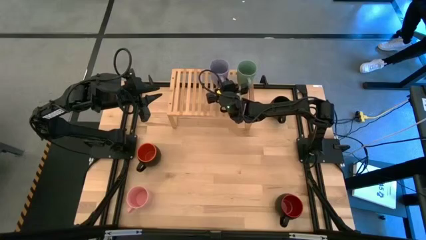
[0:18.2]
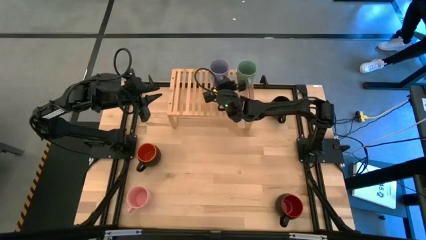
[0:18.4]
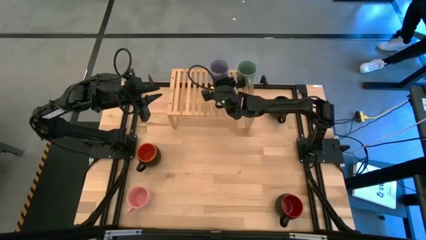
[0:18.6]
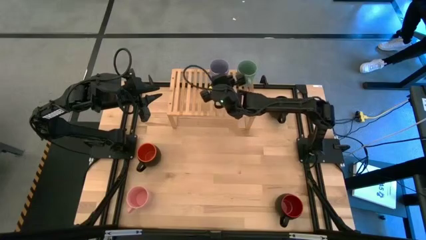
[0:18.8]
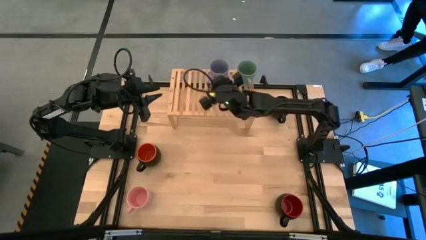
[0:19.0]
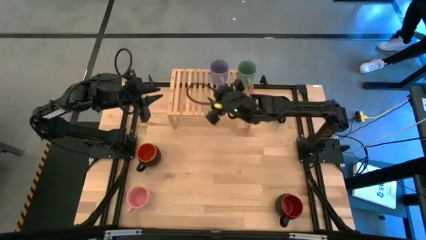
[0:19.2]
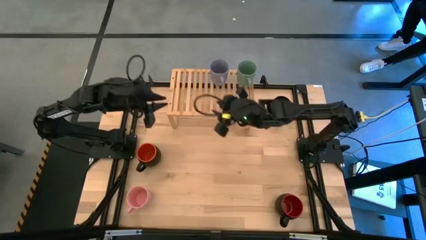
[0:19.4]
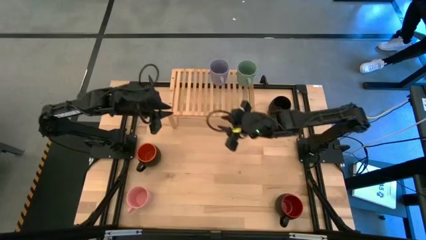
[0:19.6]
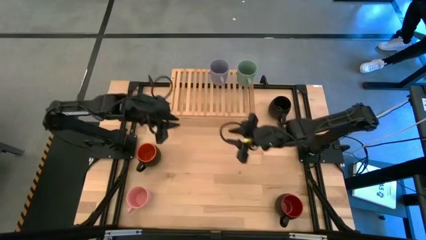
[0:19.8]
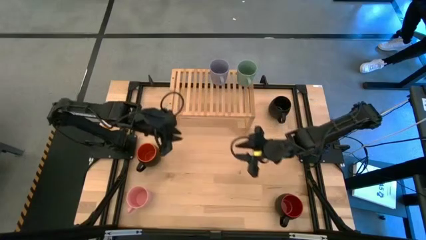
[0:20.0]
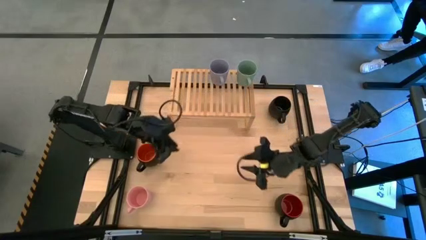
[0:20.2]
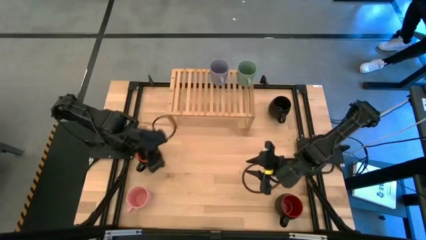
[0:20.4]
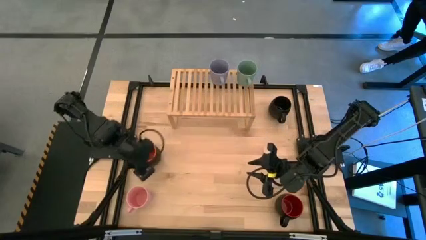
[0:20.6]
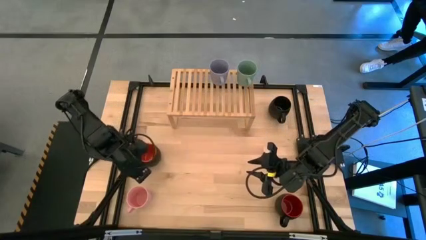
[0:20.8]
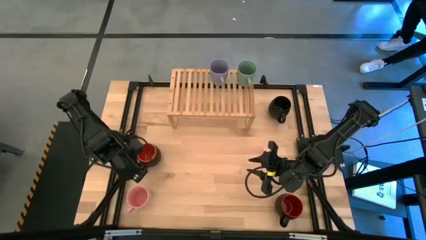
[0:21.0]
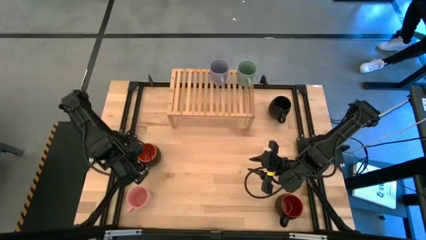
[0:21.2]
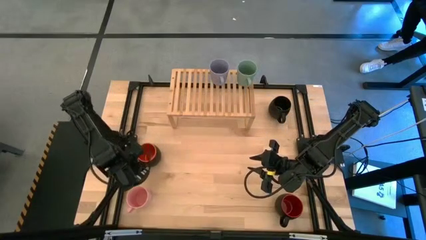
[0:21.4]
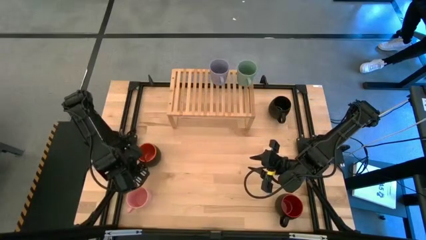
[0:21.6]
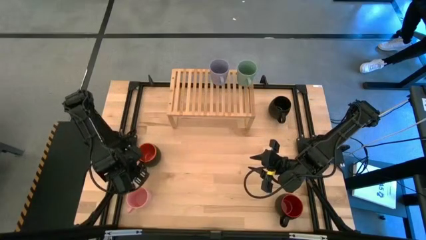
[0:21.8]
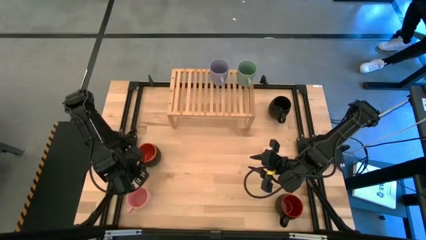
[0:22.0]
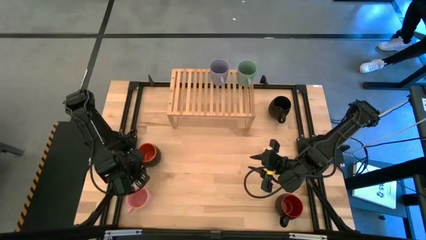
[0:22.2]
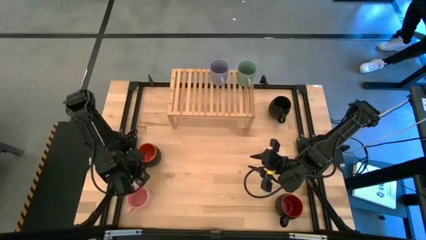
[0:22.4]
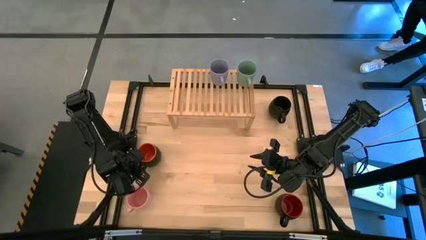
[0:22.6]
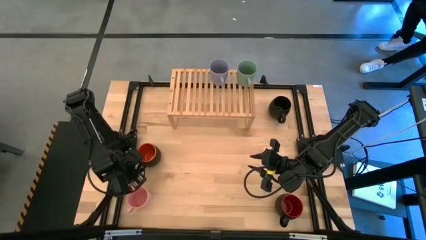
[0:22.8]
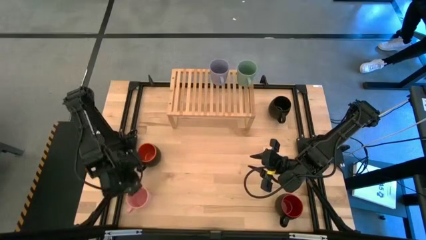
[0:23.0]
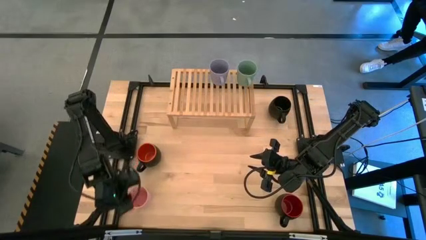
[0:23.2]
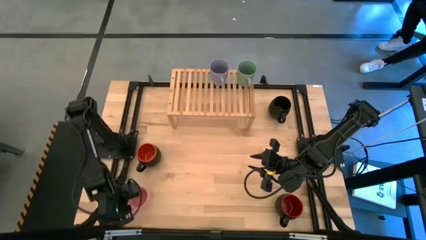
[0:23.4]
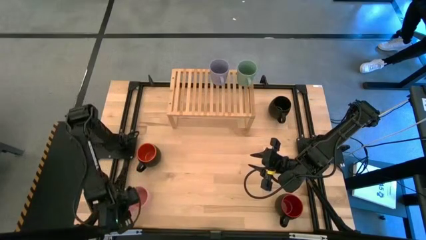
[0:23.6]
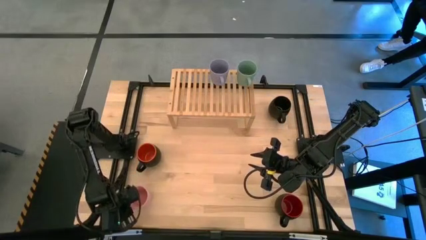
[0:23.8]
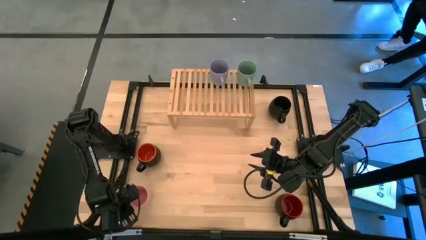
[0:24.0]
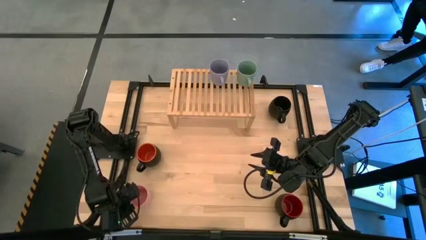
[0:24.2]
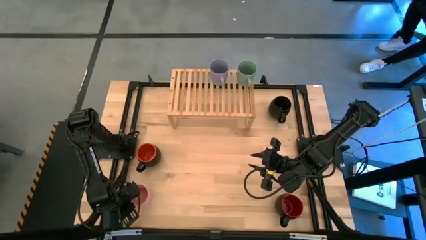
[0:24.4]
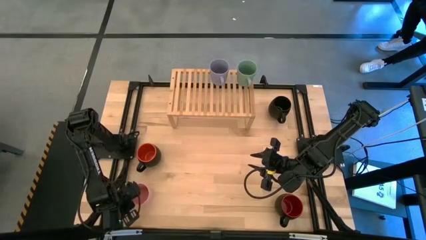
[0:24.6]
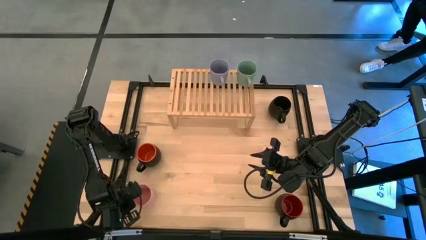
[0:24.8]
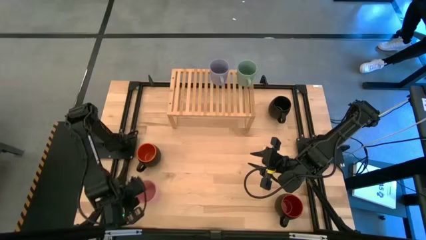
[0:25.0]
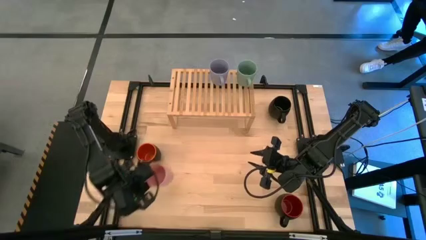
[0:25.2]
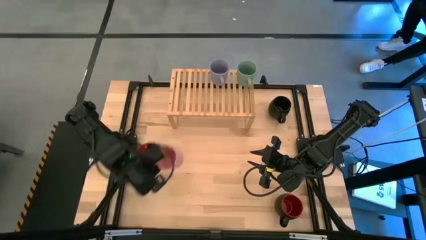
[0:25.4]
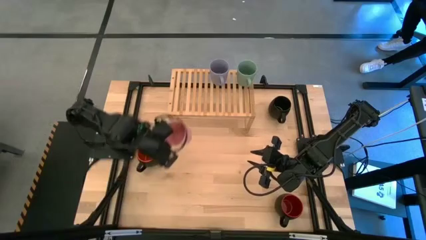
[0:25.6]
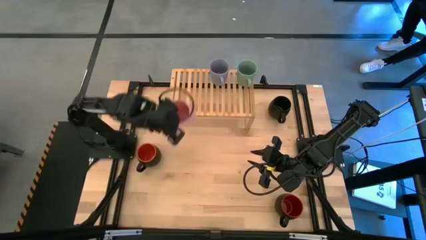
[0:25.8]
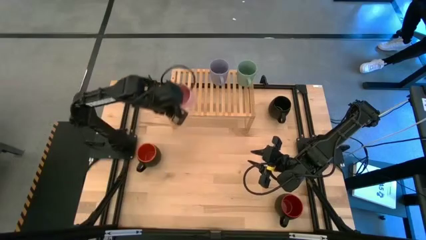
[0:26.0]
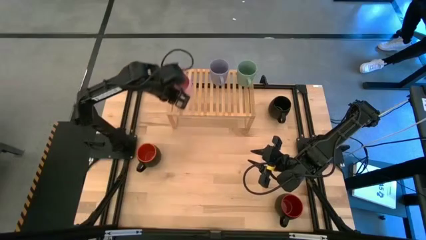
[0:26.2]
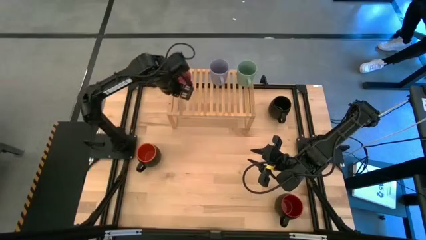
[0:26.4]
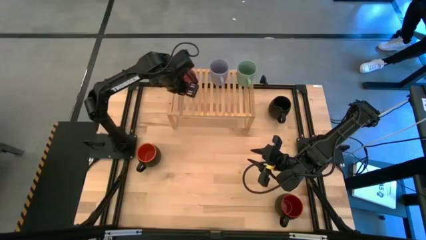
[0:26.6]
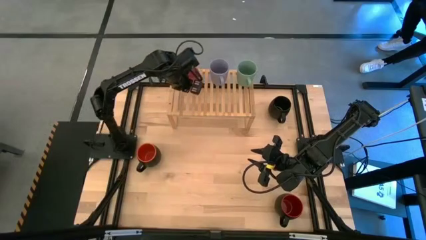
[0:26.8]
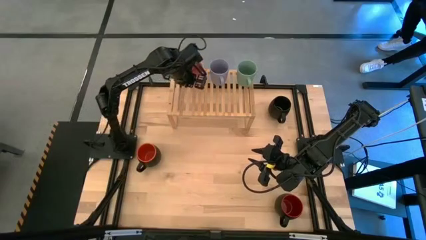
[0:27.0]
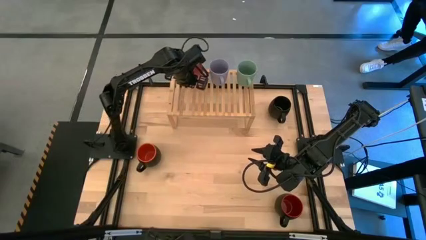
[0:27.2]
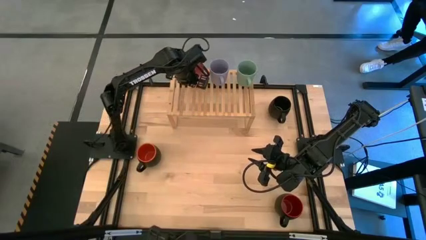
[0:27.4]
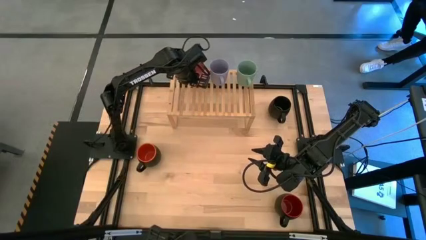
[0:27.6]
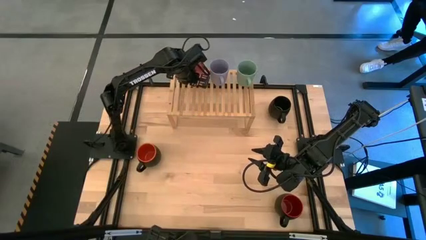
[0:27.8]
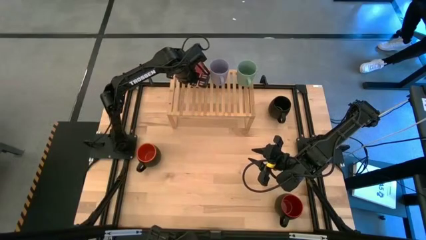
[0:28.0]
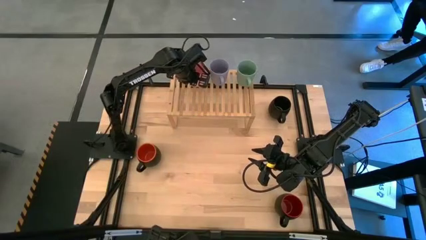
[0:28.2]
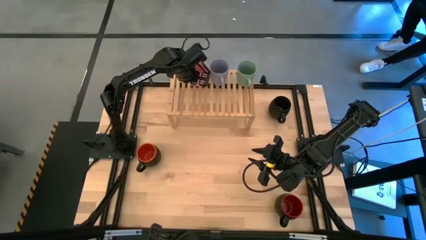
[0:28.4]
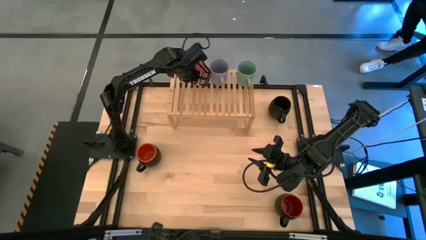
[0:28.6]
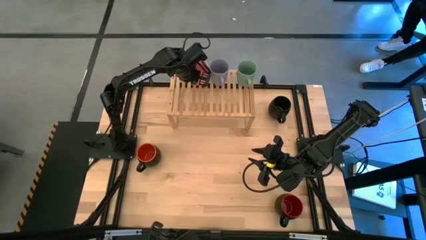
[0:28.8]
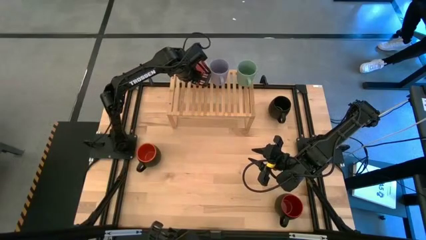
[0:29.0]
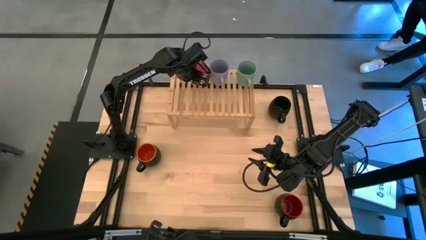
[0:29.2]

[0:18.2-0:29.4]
Task: Place coffee mugs
Put the pink mug on the shelf

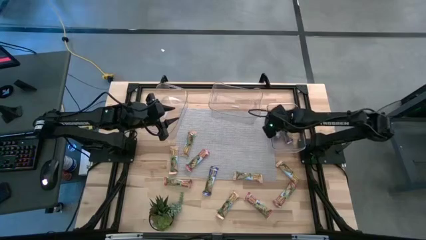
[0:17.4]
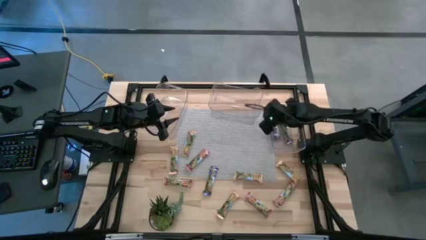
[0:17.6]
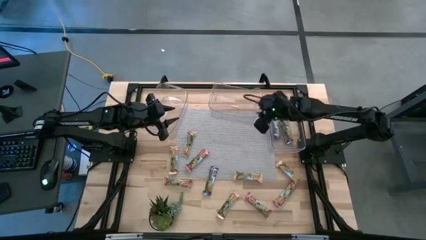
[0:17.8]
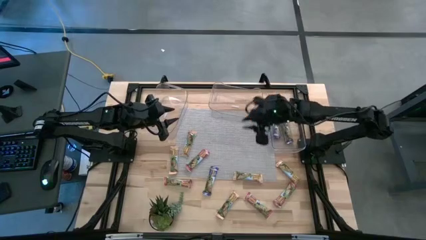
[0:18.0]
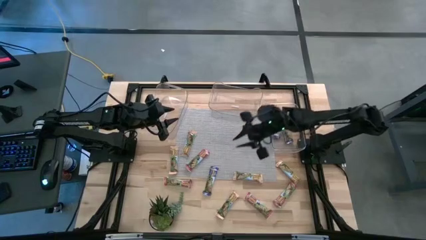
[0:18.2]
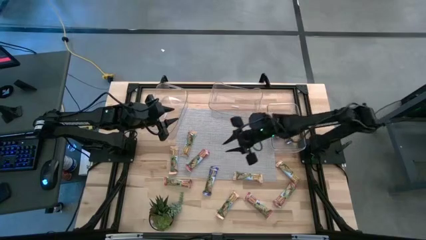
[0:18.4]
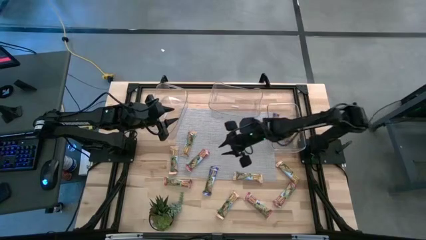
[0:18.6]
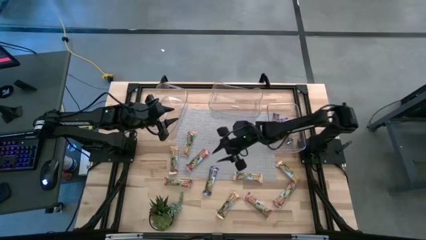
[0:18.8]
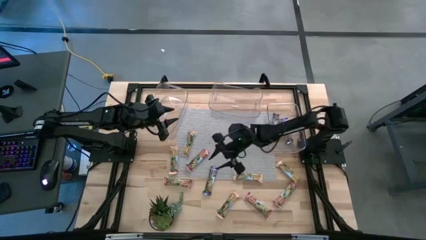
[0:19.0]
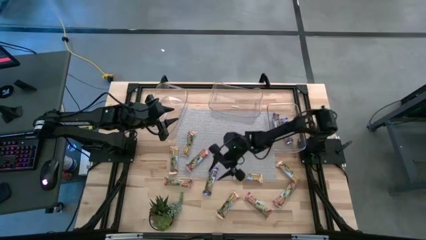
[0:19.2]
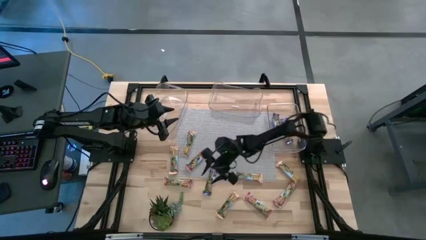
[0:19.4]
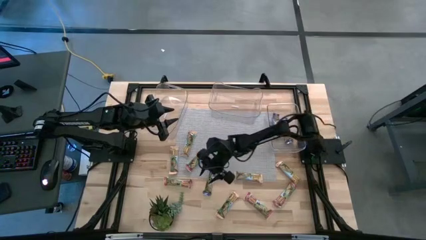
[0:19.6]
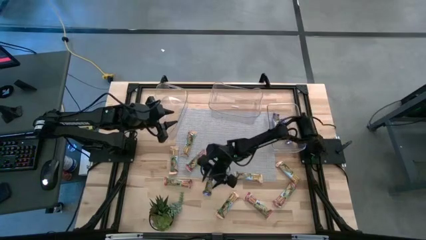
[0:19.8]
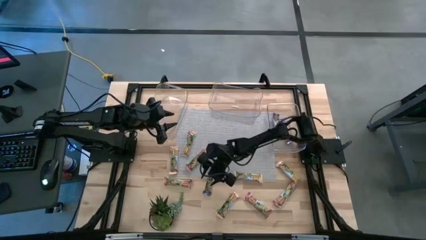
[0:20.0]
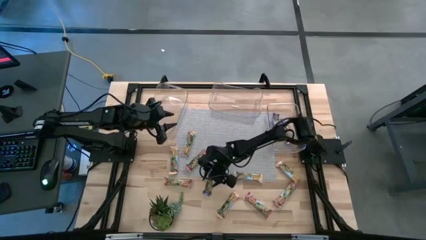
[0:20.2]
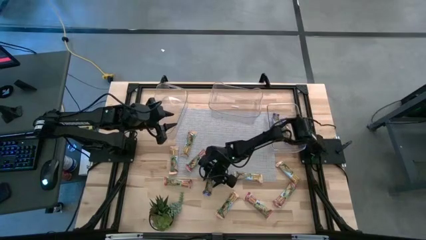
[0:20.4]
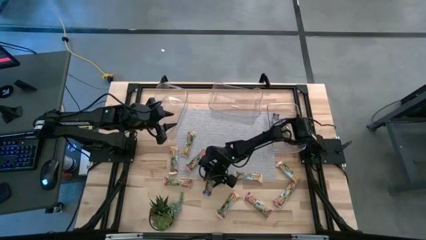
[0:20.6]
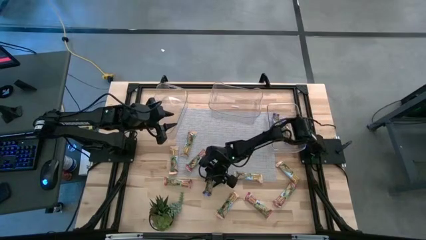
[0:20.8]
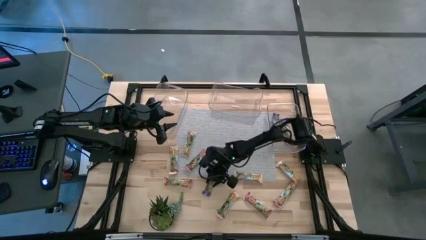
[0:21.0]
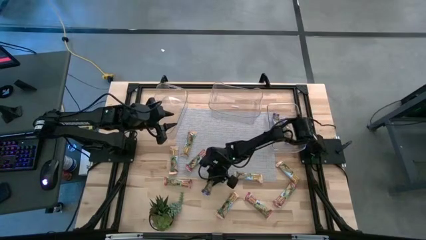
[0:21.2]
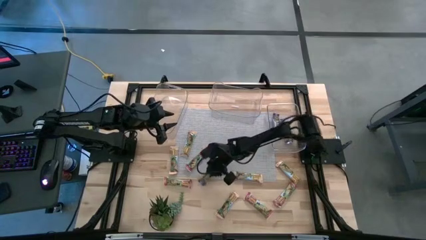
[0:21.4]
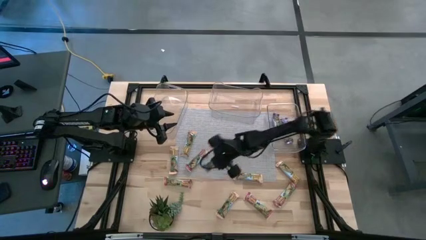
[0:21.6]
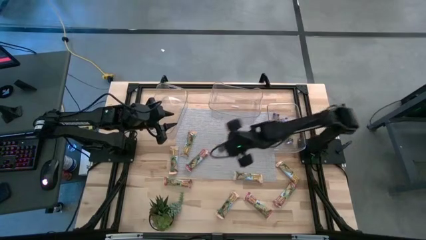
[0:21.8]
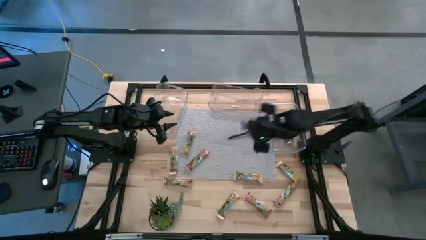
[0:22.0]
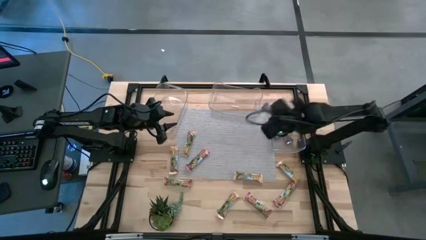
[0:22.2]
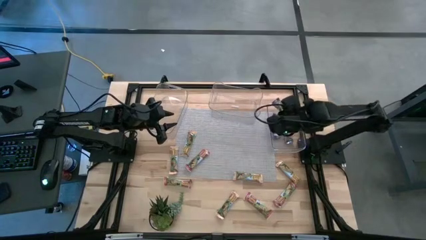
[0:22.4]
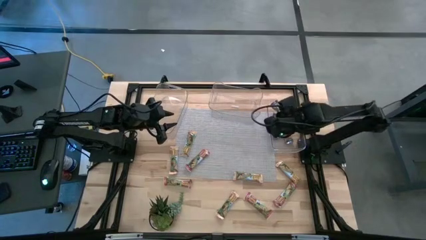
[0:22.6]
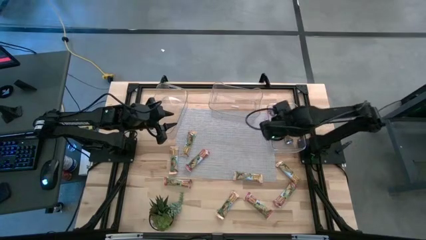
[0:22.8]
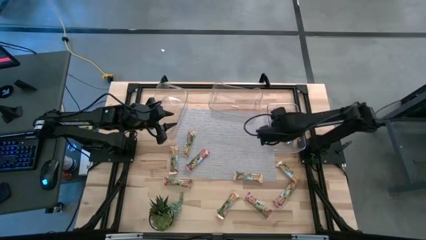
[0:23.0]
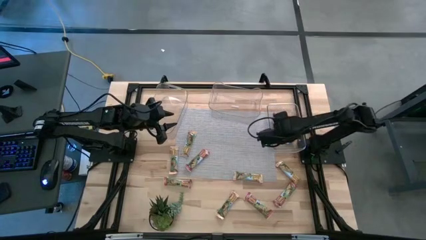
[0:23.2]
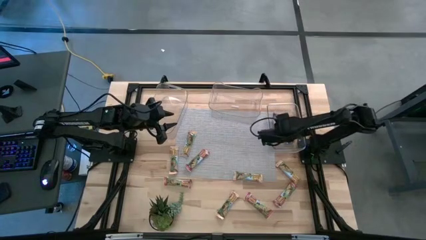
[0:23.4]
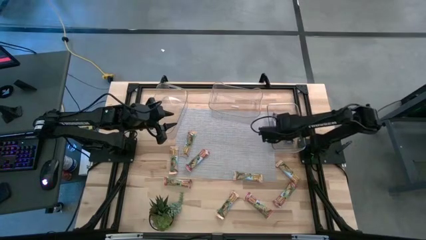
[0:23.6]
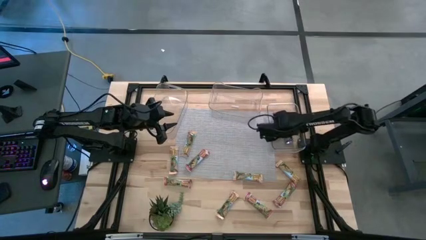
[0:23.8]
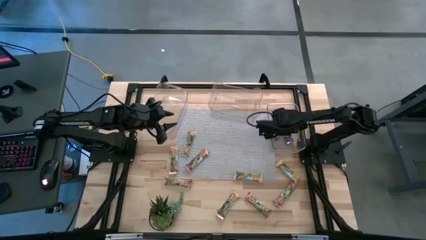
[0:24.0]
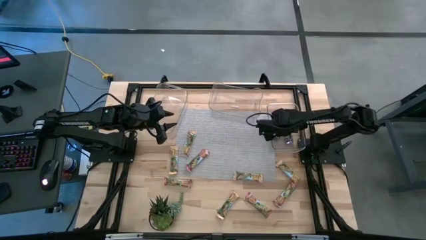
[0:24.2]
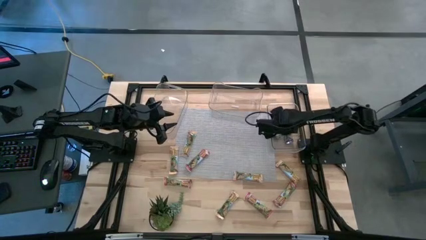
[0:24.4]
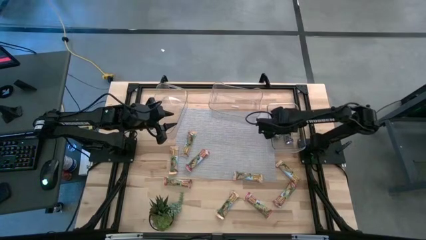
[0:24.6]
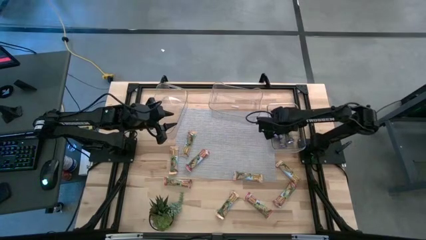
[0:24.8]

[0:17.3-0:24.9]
Task: Pick and place Granola Bars by type
Put the blue granola bar into the right transparent bin
